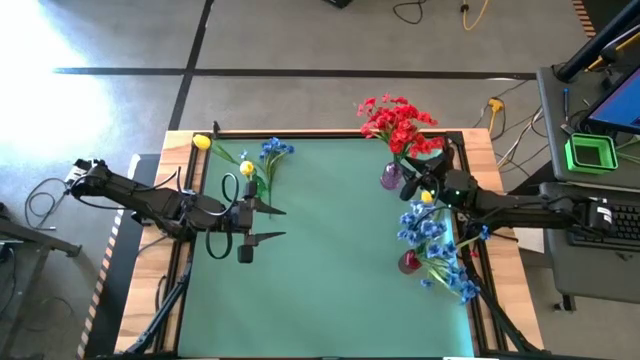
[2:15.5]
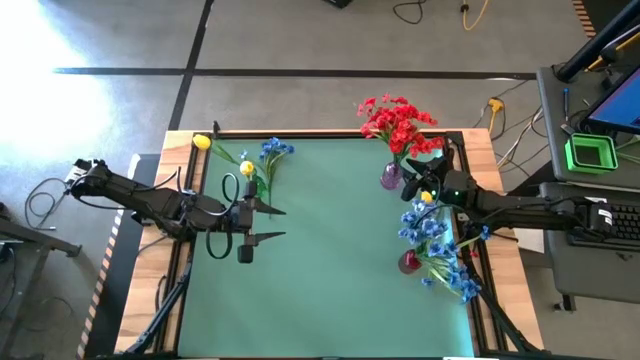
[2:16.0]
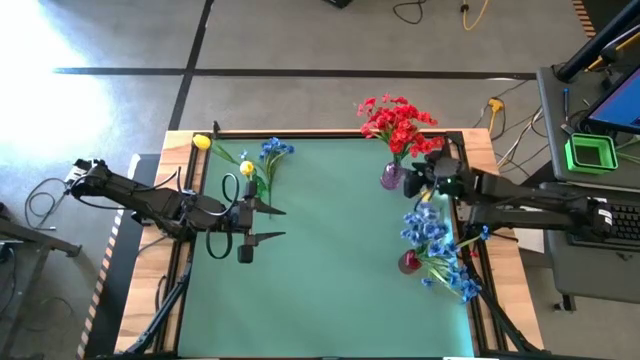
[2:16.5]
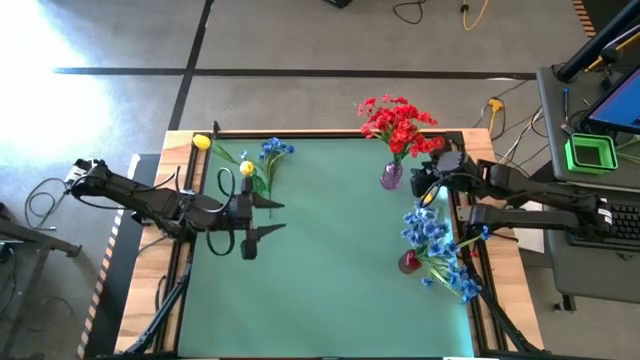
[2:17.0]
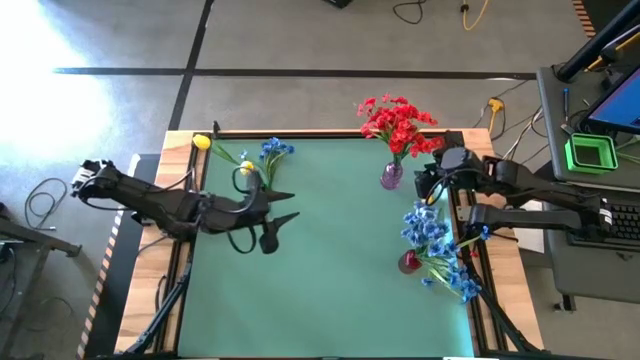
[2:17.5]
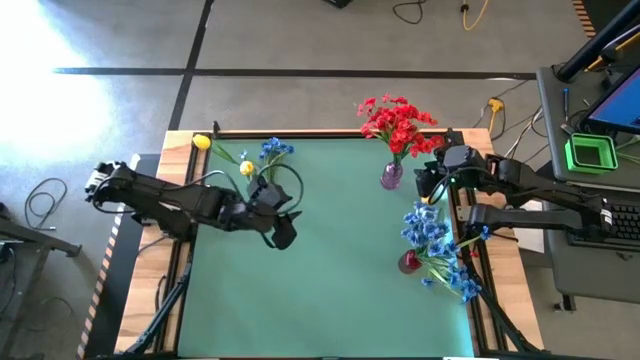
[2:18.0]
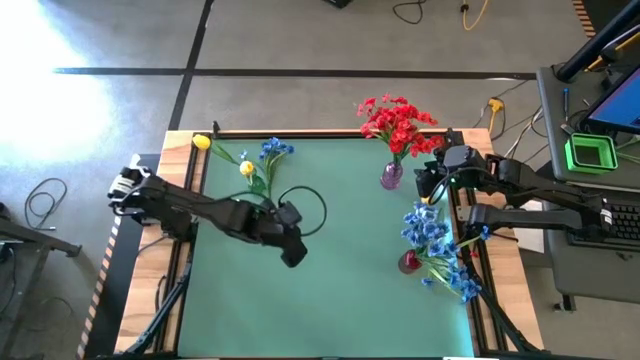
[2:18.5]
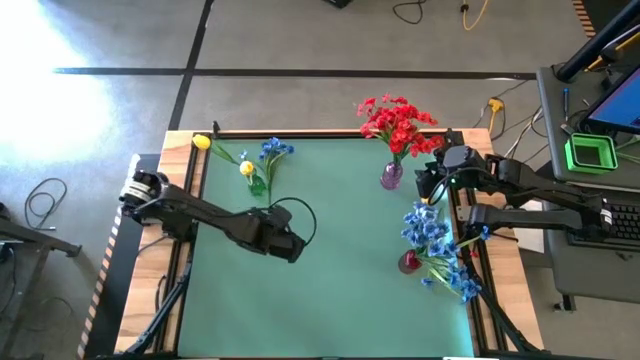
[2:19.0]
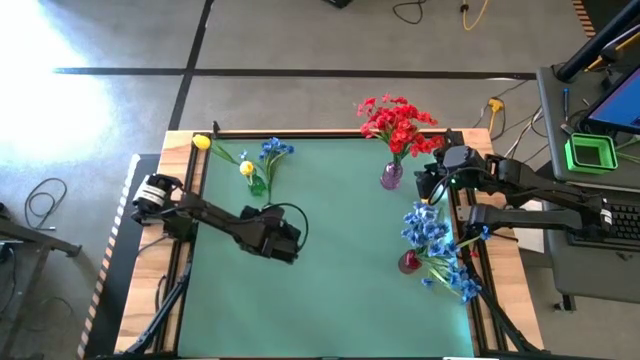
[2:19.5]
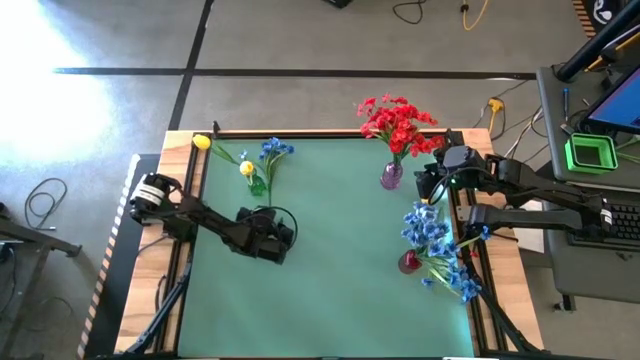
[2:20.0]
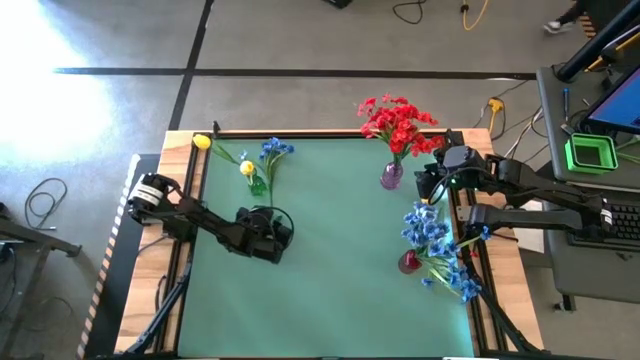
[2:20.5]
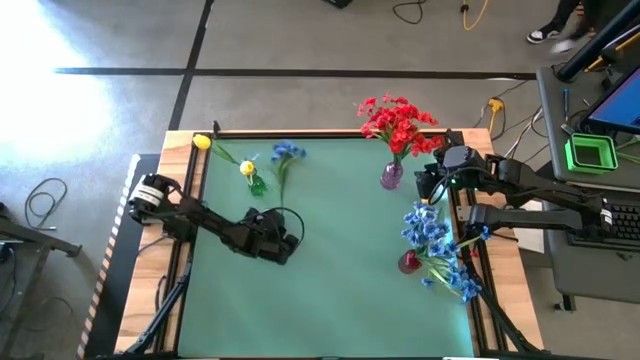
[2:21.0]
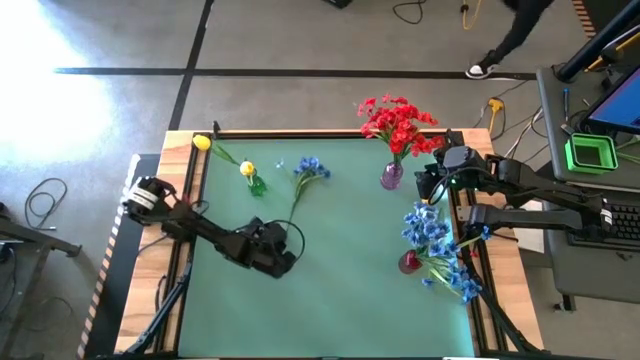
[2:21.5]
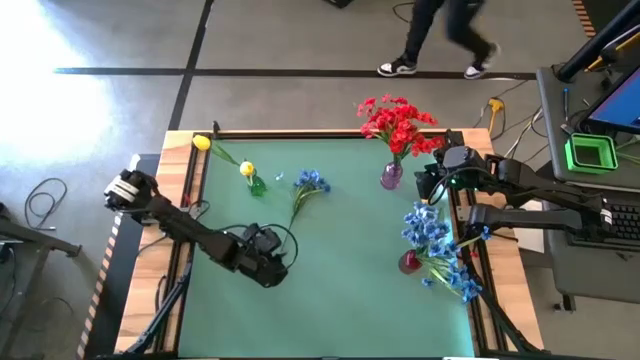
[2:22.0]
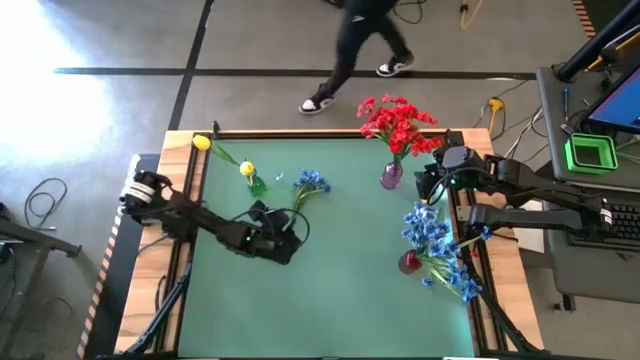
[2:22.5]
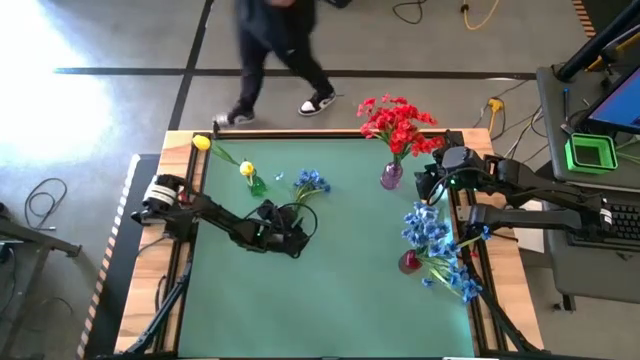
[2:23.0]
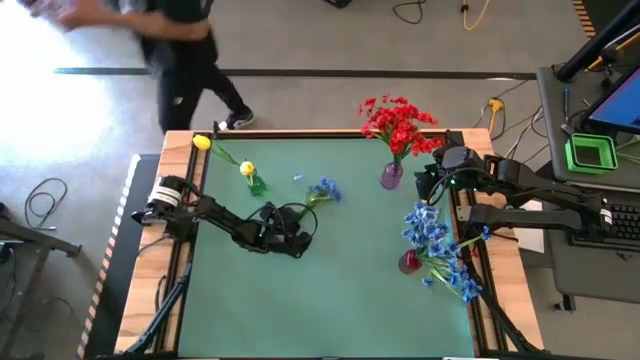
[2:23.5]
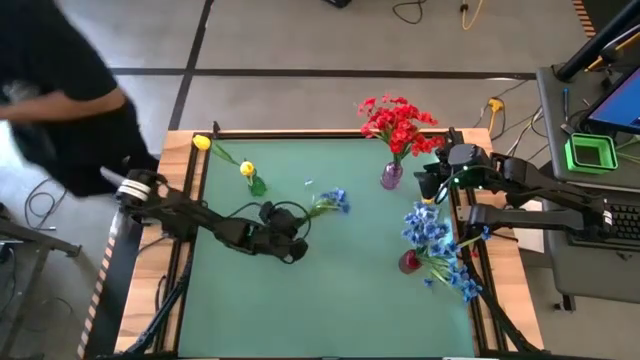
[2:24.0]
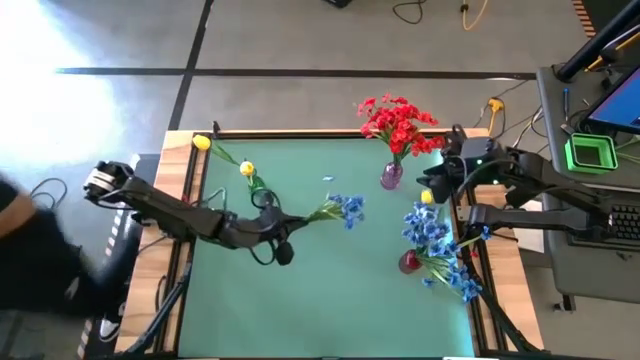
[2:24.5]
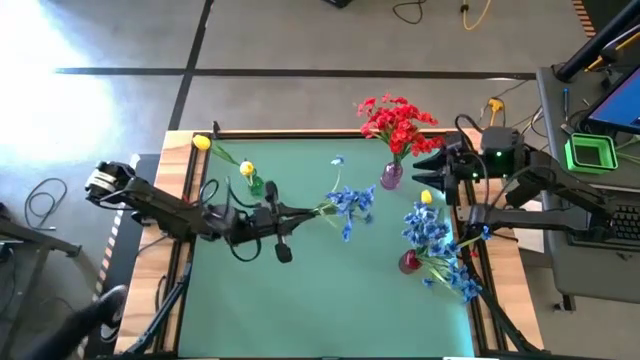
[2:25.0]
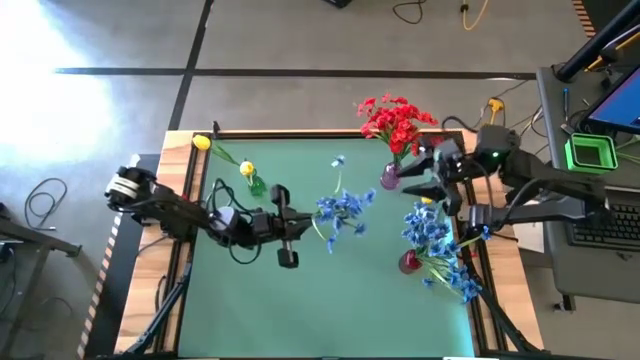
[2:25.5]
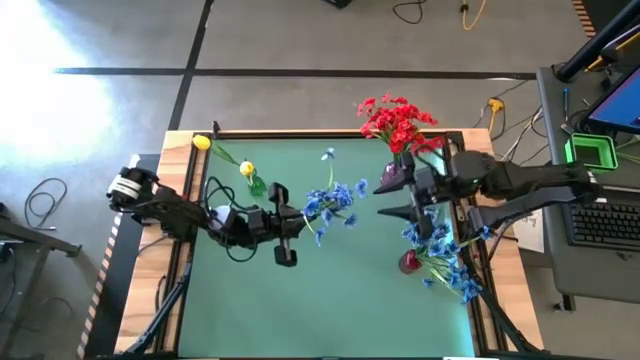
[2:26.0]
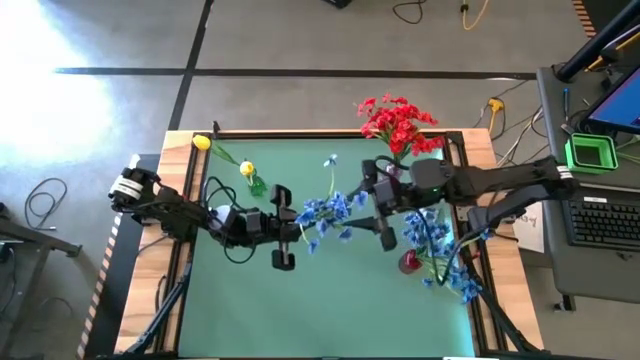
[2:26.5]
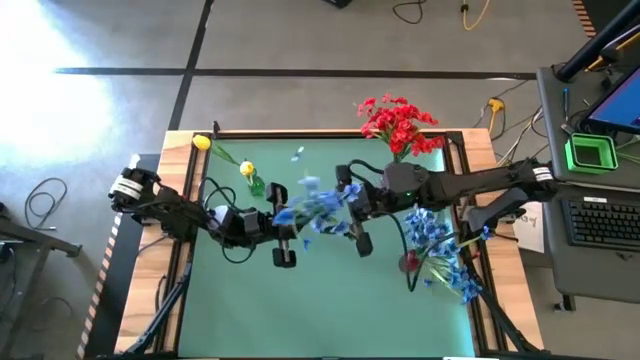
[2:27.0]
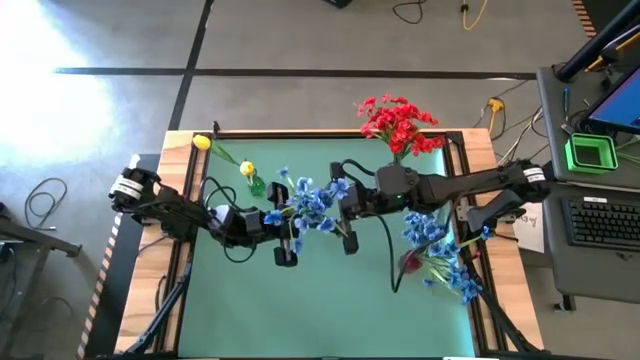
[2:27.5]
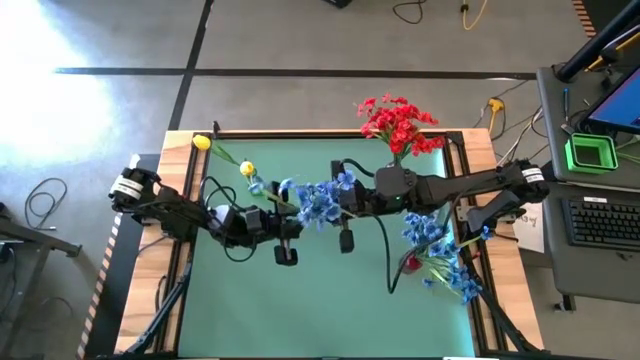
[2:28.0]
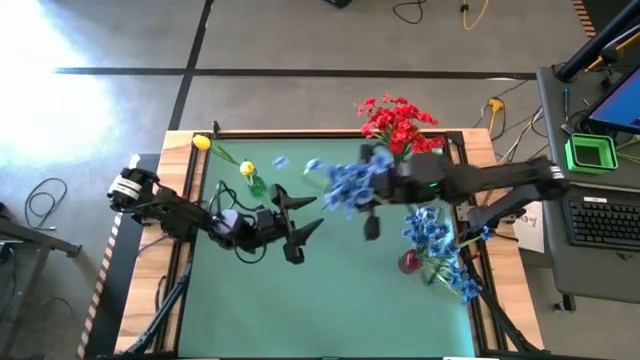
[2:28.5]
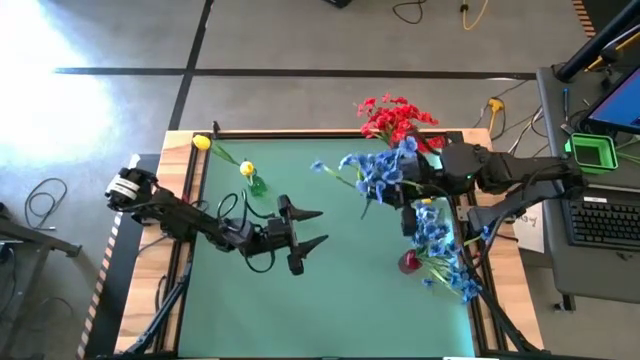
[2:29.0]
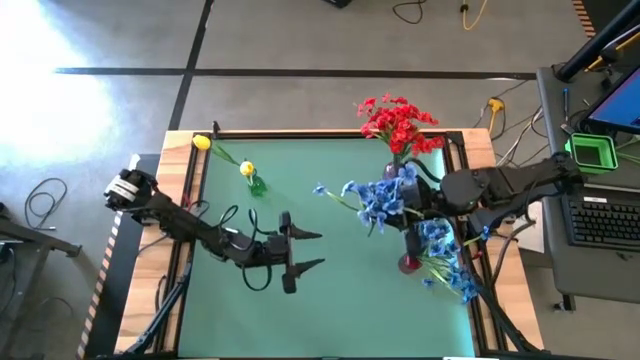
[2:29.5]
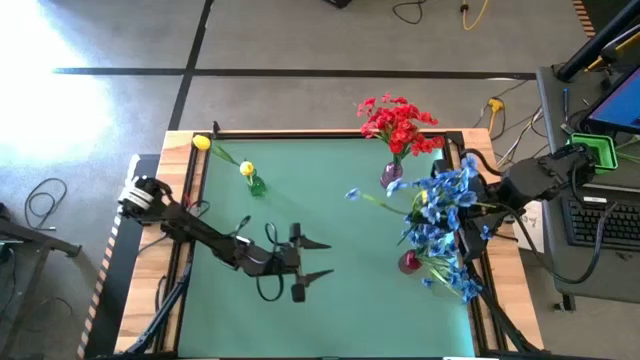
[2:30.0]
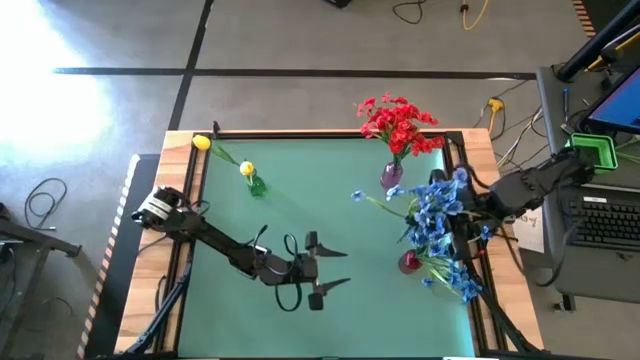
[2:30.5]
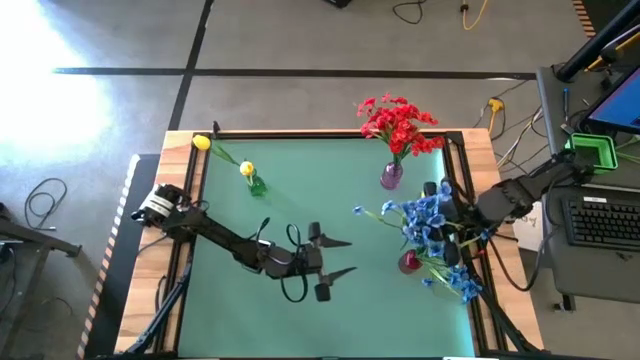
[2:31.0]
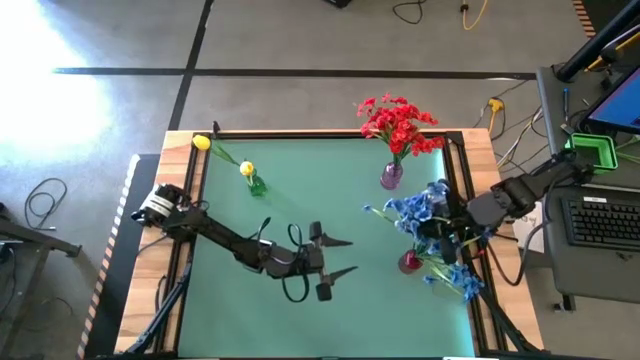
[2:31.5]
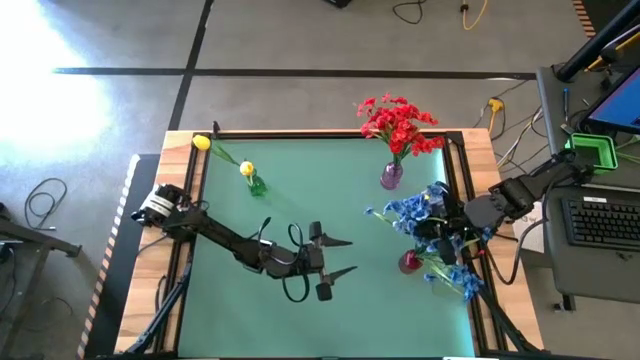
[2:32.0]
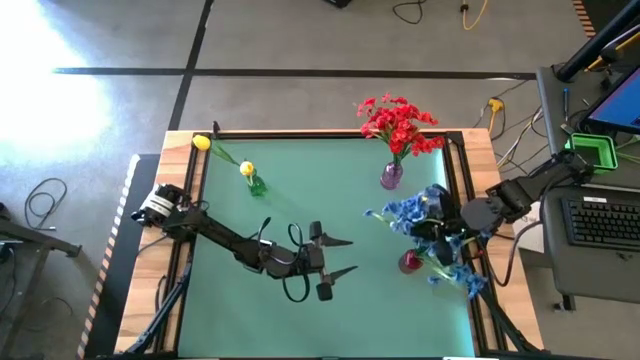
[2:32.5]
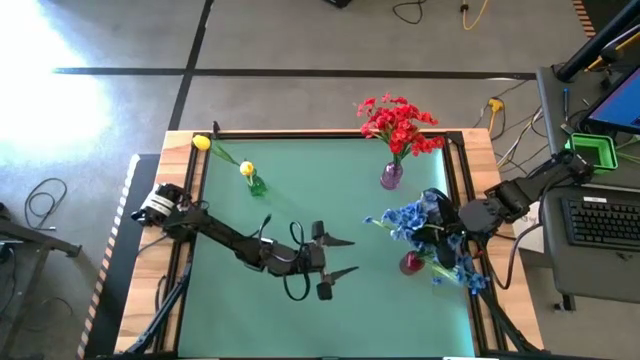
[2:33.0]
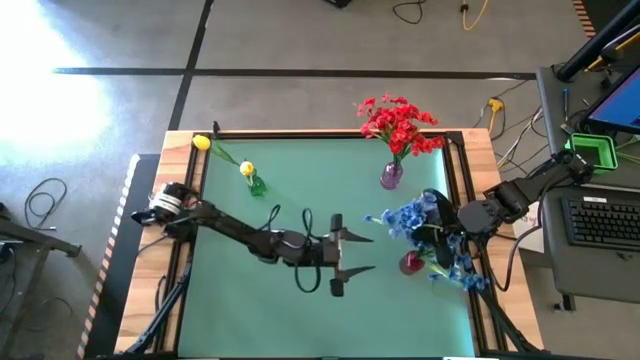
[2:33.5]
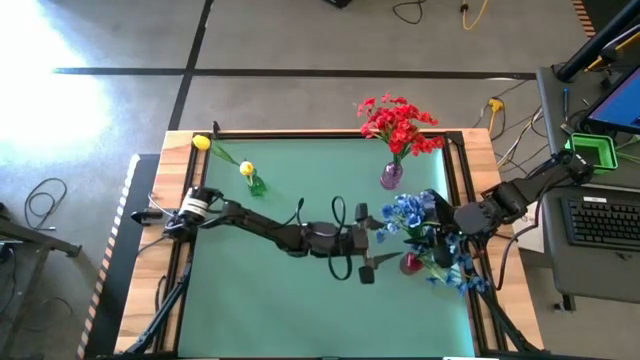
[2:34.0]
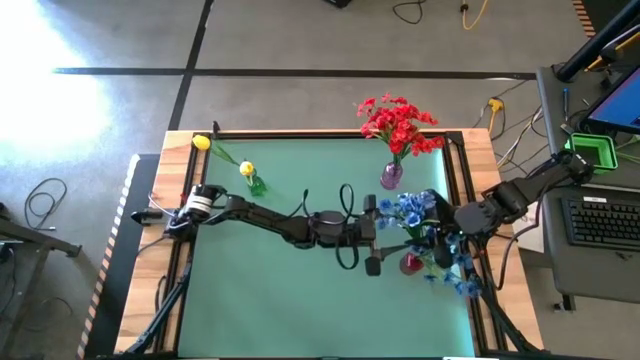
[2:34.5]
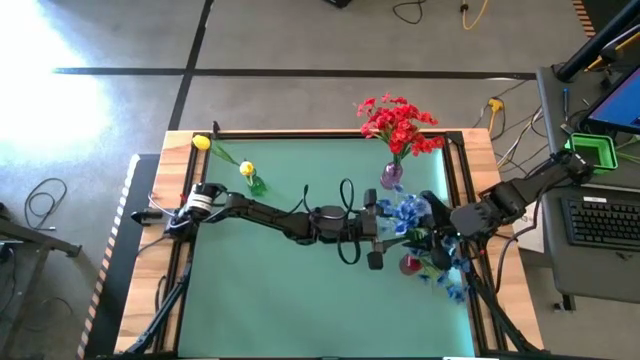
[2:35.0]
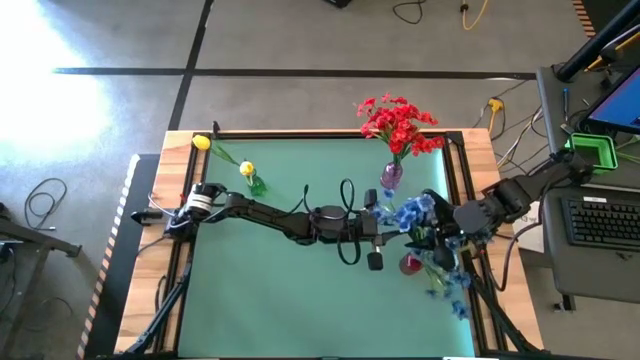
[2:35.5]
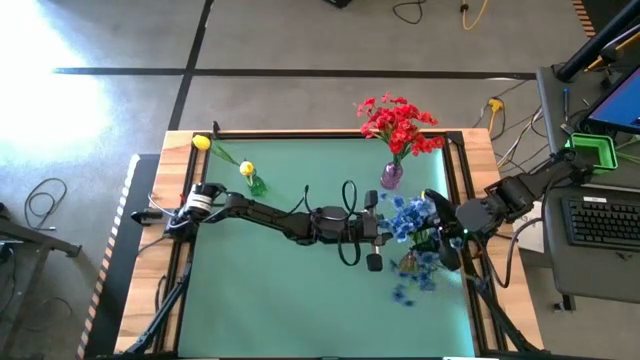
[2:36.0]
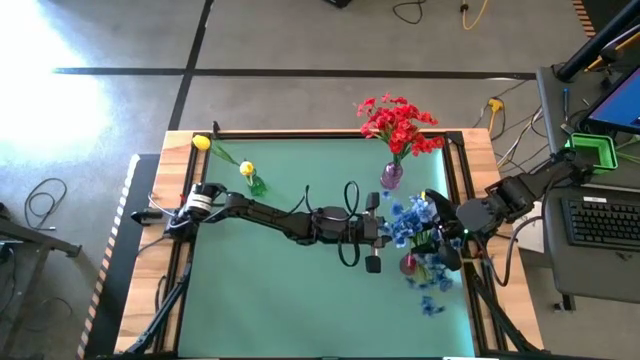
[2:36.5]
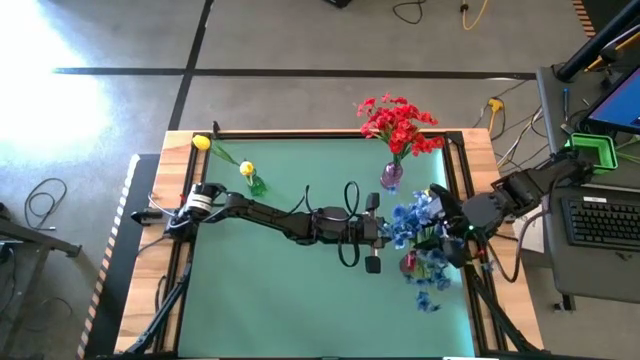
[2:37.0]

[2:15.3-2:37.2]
Task: Sort flowers into vase by color
Put the blue flower into the red vase
